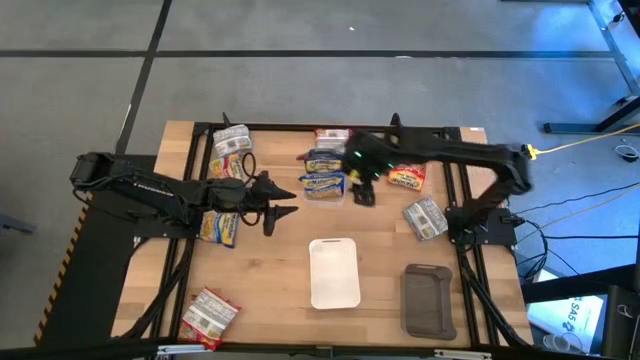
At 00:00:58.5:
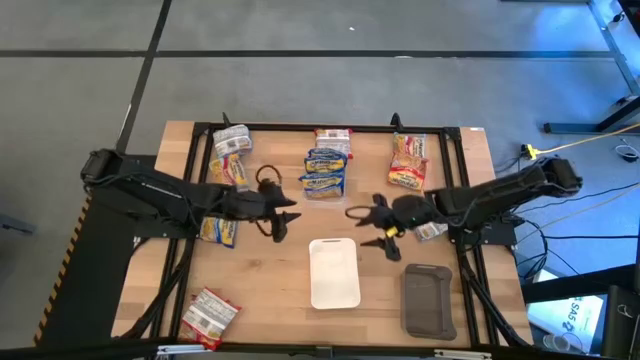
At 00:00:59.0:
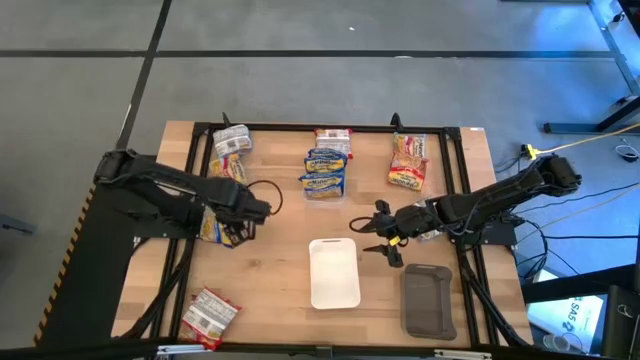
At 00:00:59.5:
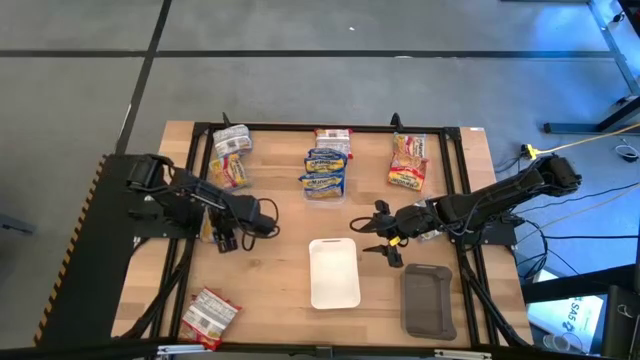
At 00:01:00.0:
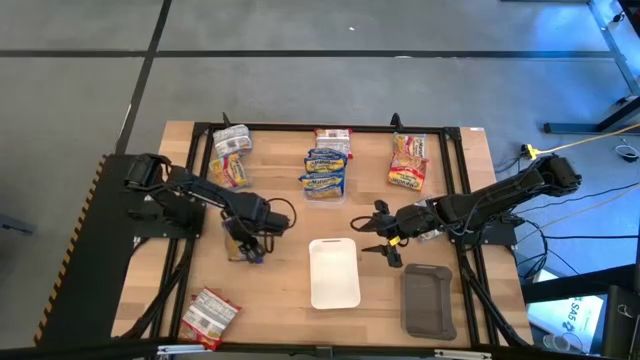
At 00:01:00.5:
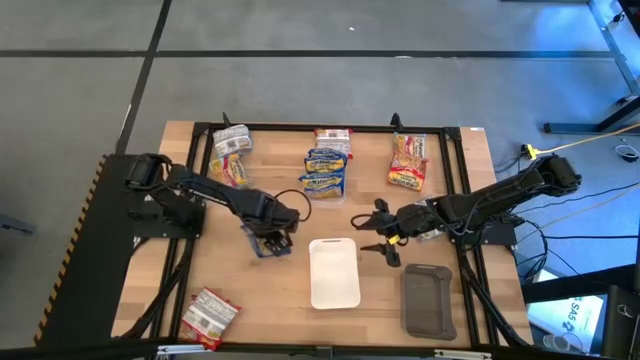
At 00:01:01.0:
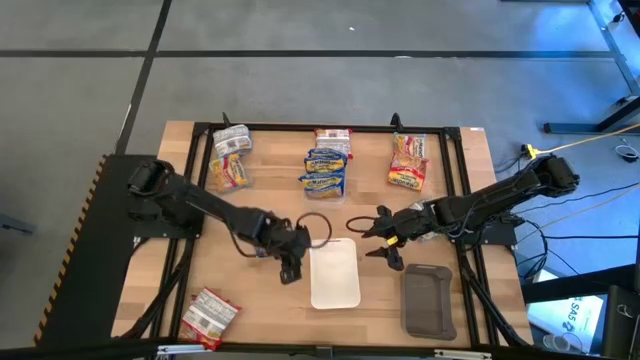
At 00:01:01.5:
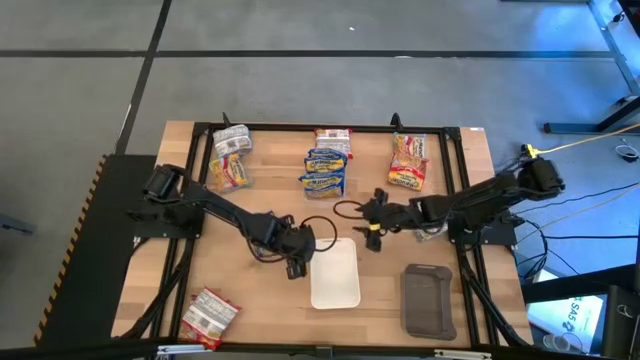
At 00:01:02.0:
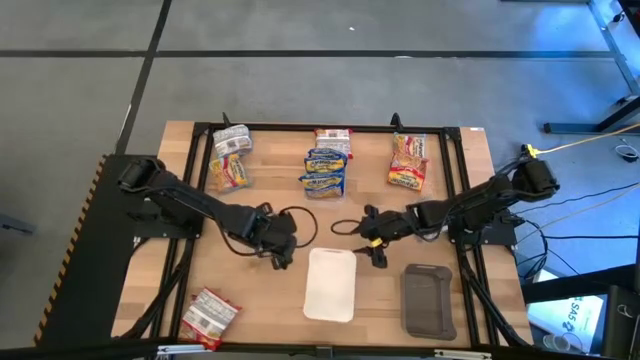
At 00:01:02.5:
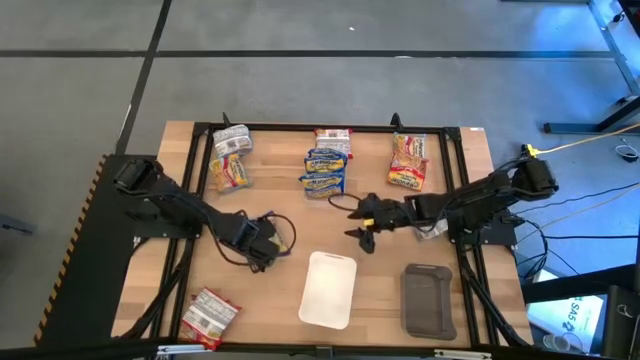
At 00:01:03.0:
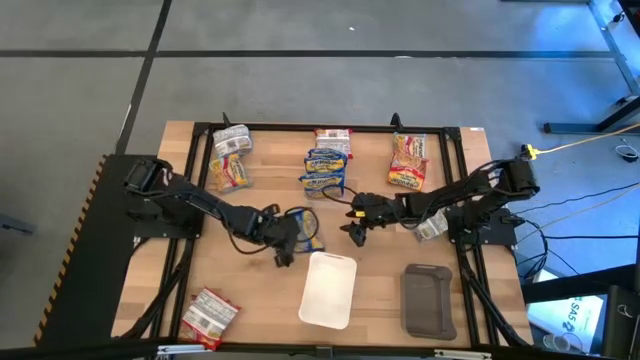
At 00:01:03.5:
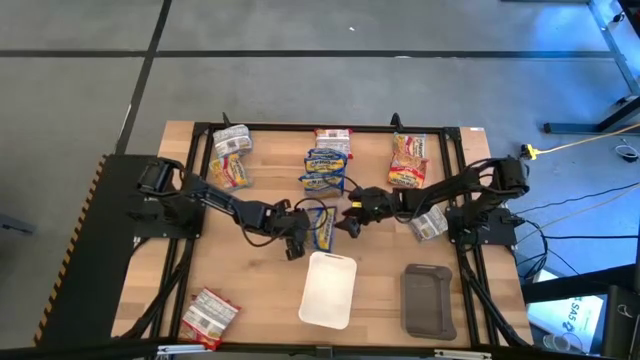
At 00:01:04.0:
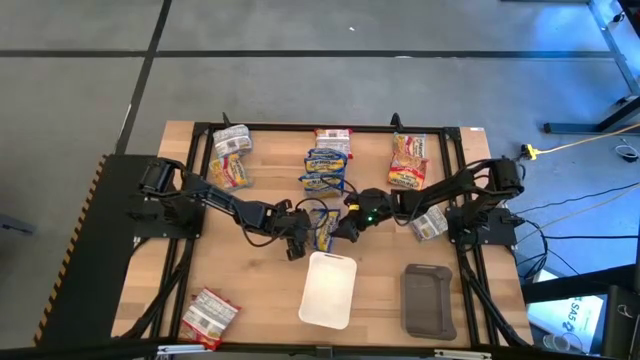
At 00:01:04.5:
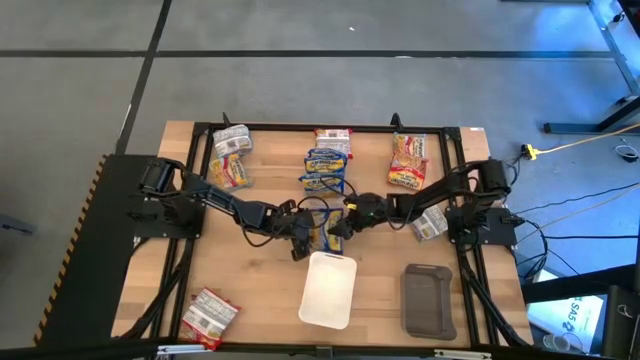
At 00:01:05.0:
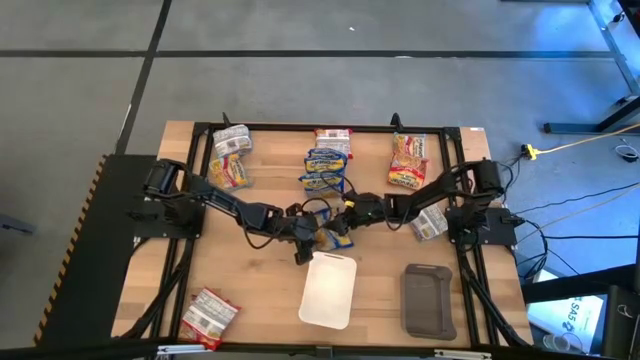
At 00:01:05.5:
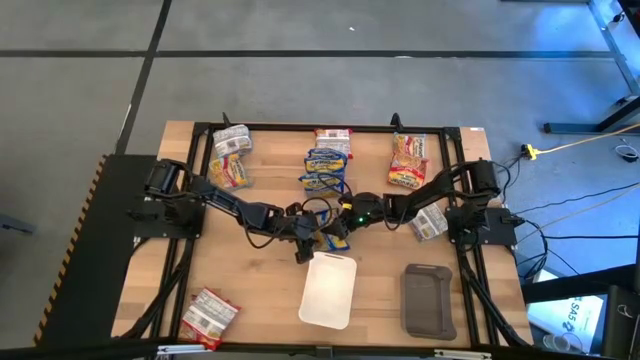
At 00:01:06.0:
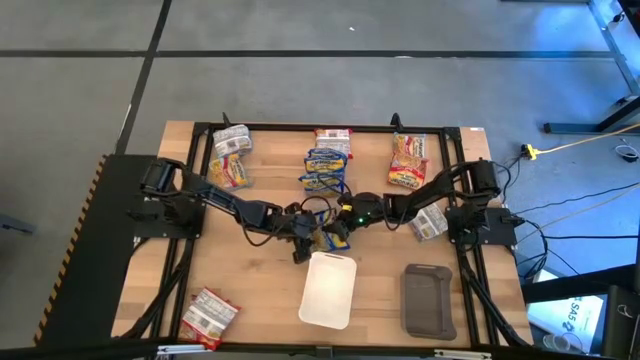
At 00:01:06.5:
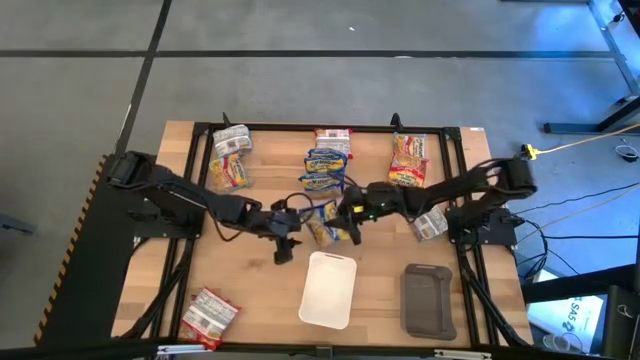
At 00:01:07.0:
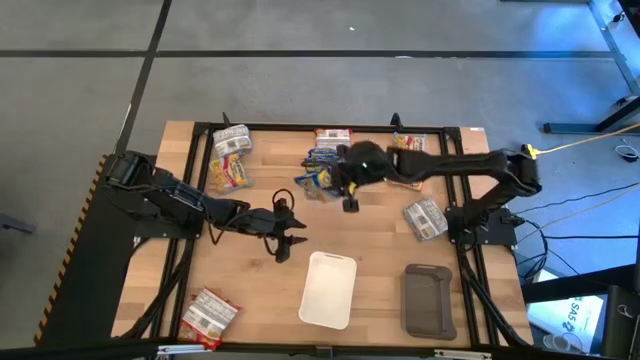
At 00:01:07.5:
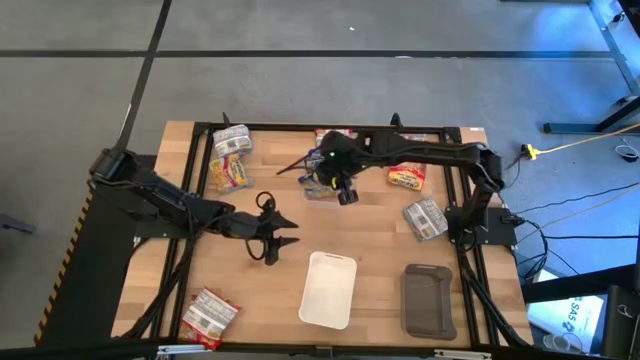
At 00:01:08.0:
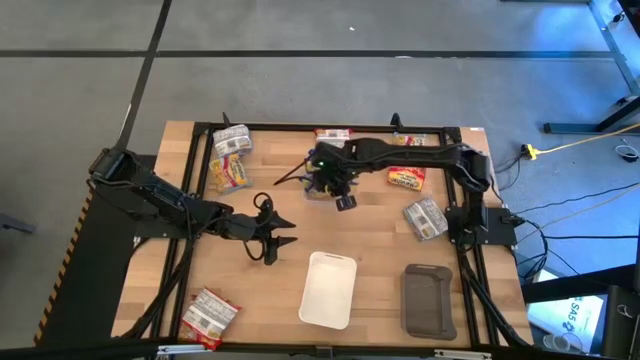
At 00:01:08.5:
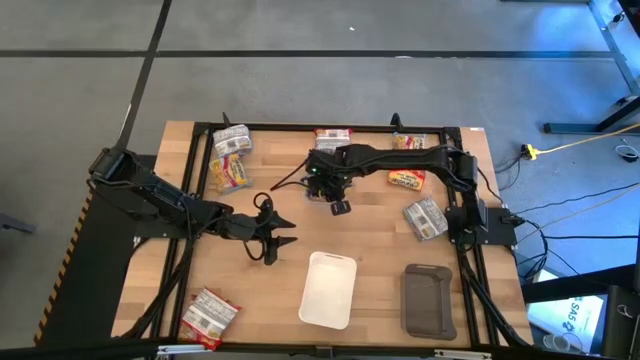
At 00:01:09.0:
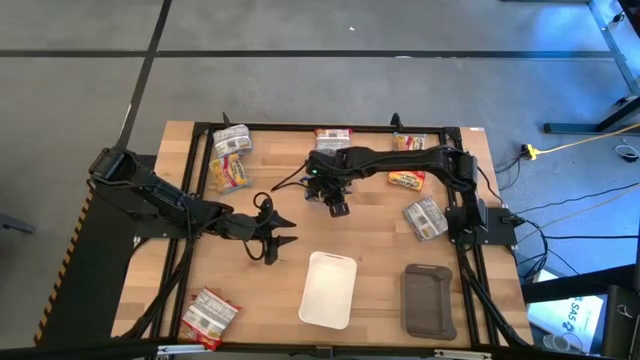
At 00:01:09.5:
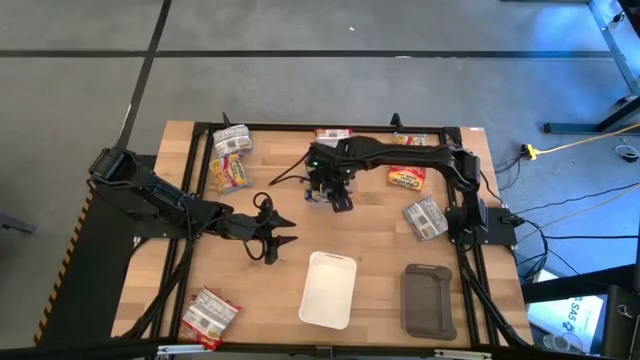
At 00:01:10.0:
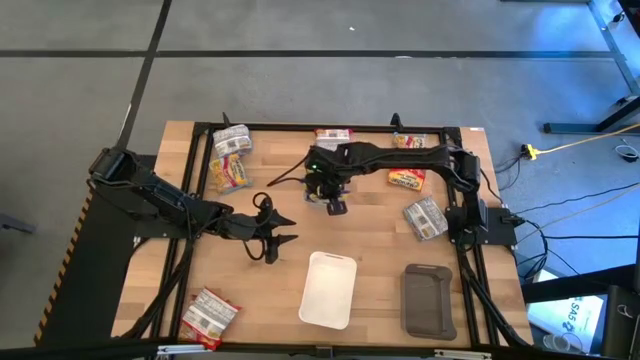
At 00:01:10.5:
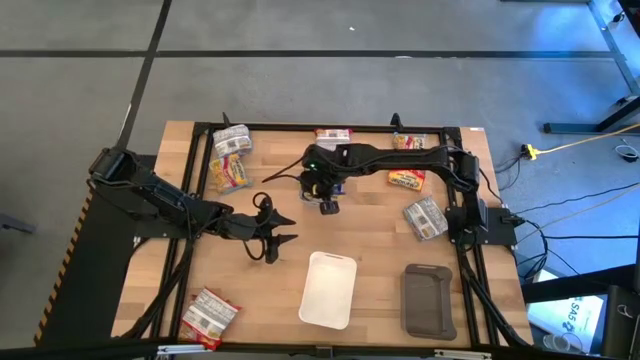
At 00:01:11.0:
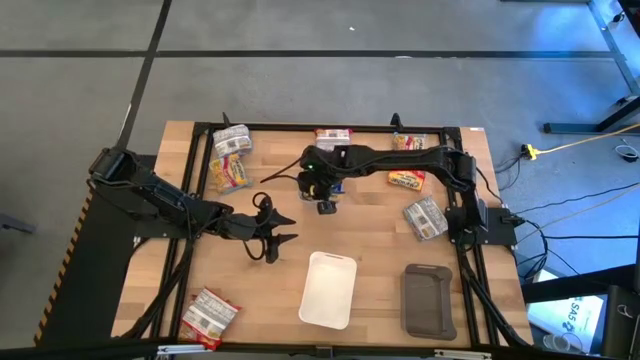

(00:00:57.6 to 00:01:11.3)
Task: Sort Maruchan noodles
Put the blue noodle pack into the transparent bin

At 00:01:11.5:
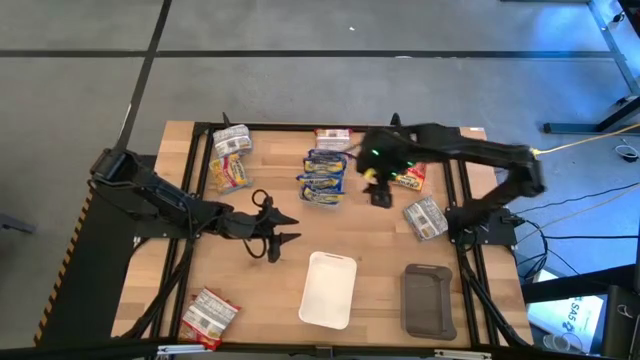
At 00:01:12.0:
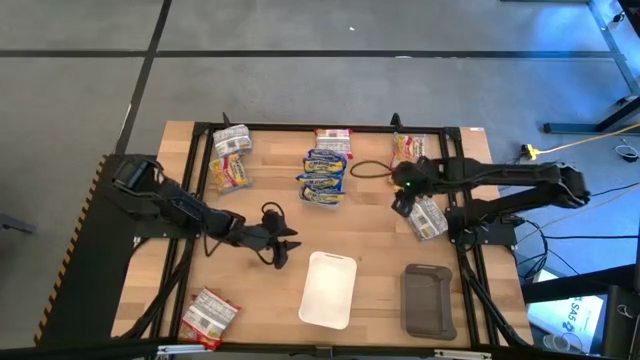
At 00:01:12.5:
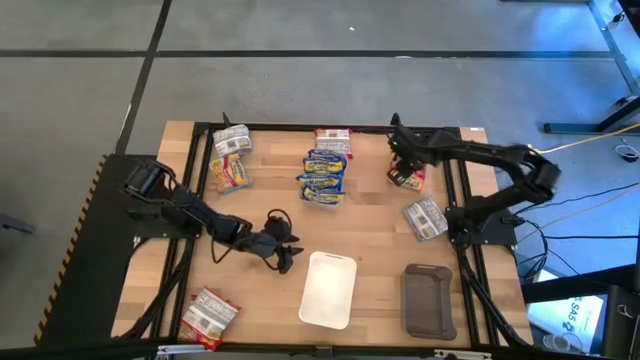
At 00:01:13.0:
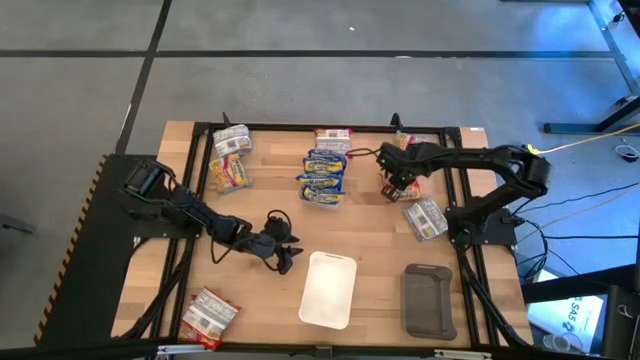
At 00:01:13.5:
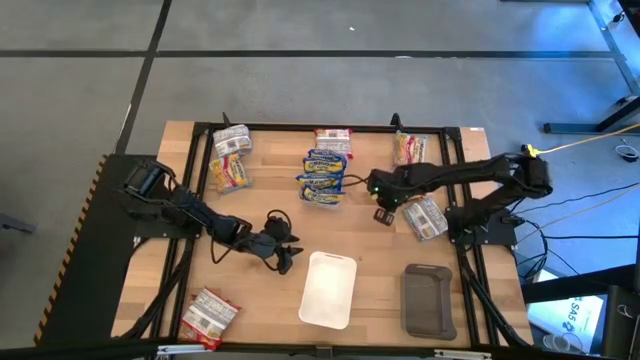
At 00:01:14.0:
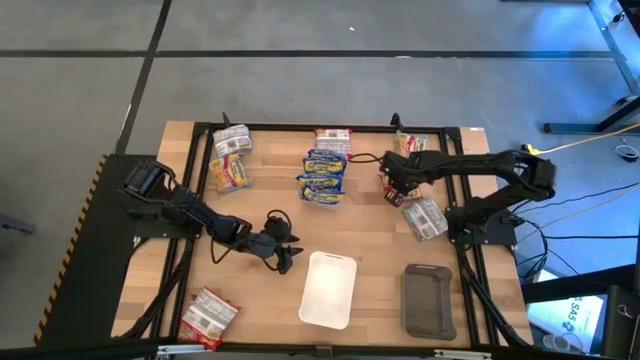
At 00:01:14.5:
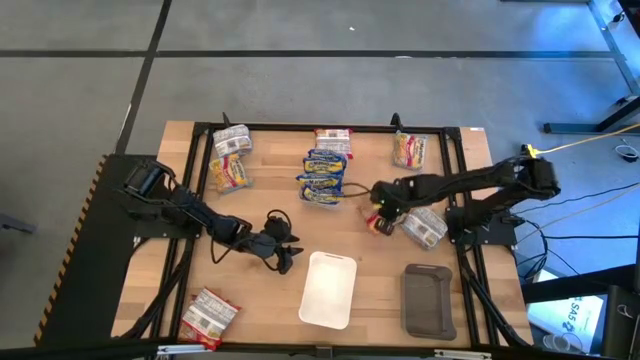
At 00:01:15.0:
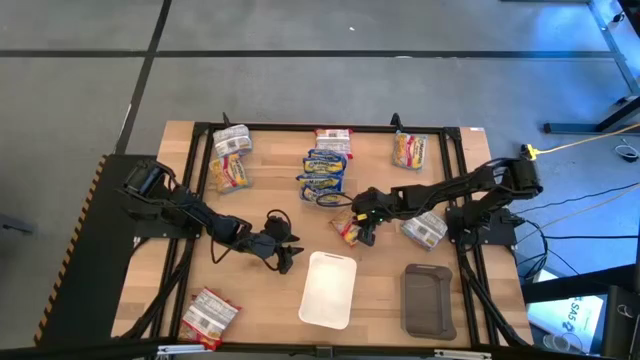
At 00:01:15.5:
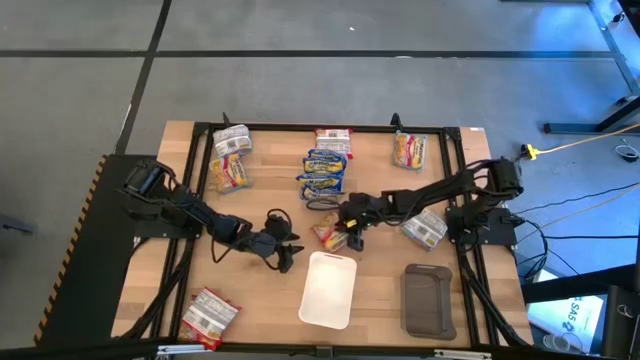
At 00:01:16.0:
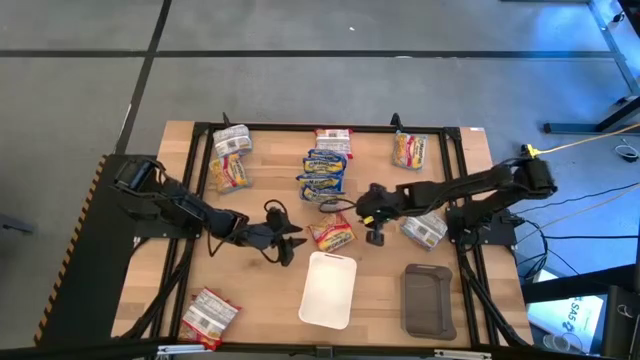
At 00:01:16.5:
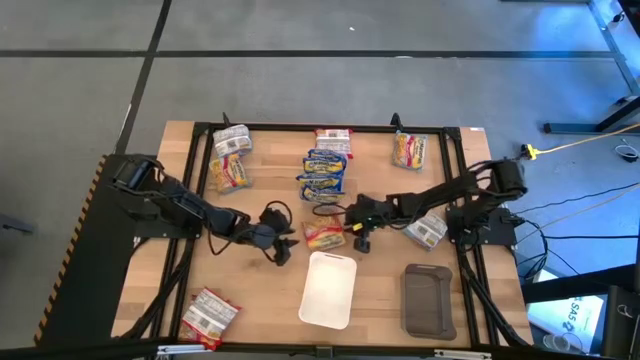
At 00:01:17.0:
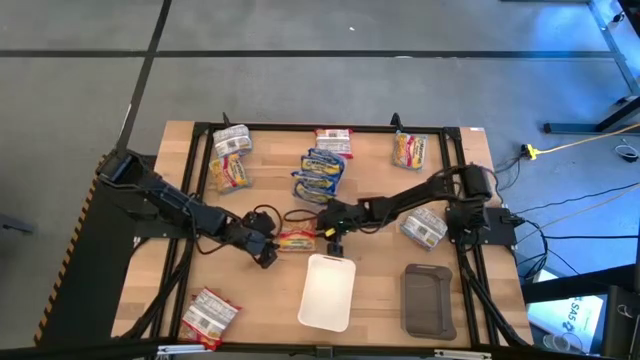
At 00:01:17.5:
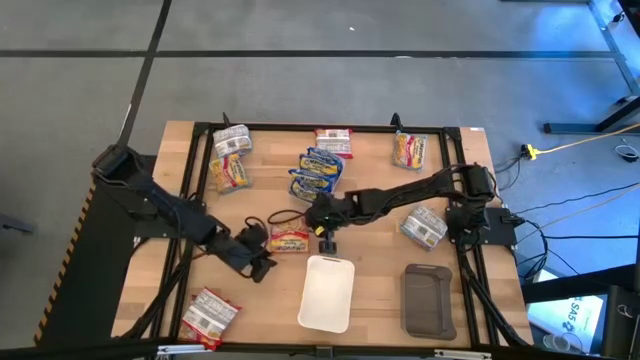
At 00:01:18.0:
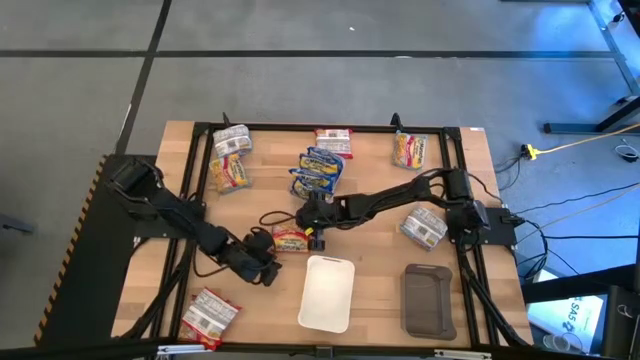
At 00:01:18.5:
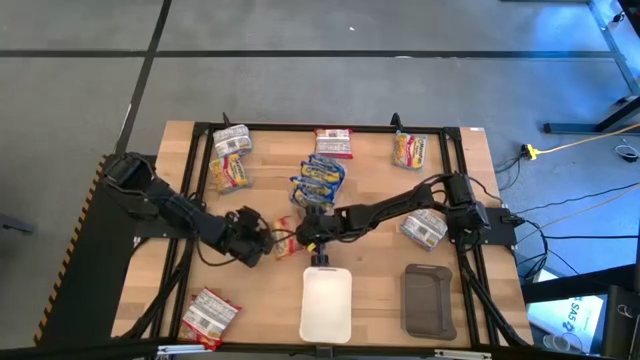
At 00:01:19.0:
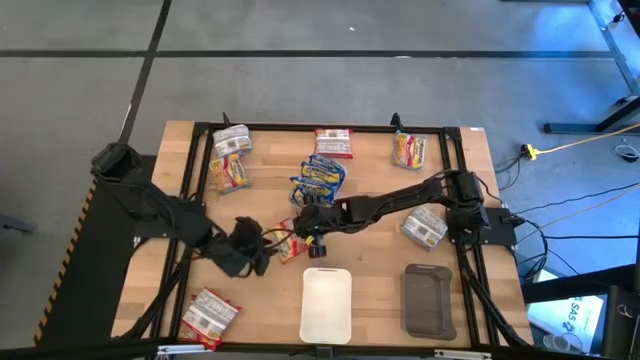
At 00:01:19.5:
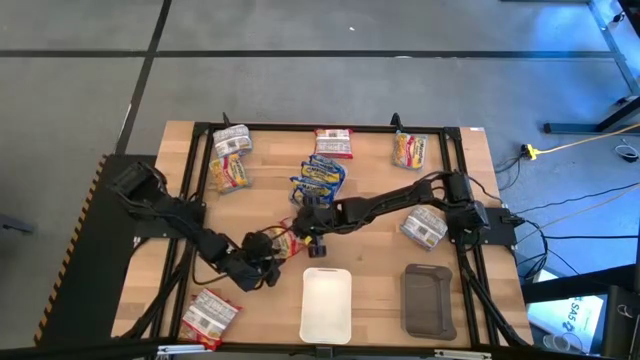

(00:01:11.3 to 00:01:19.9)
Move the red noodle pack to the center of the table
